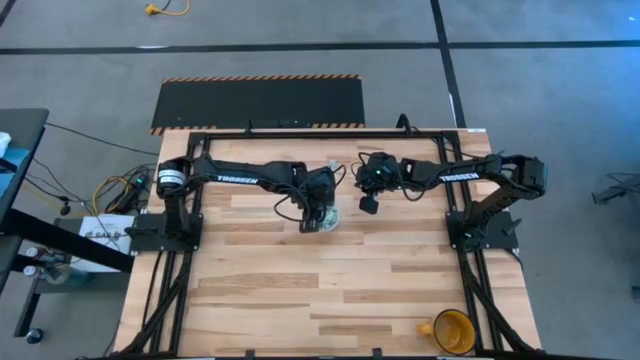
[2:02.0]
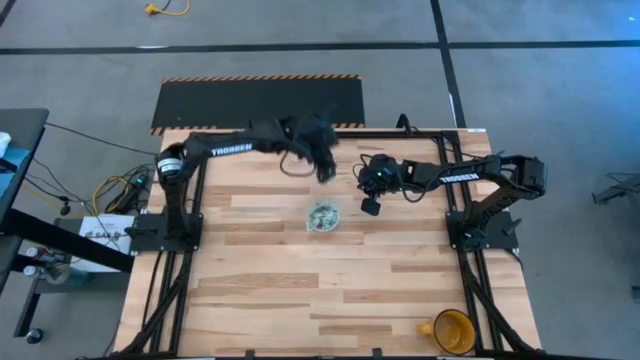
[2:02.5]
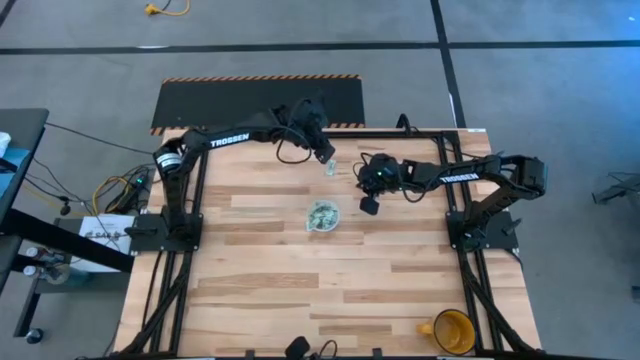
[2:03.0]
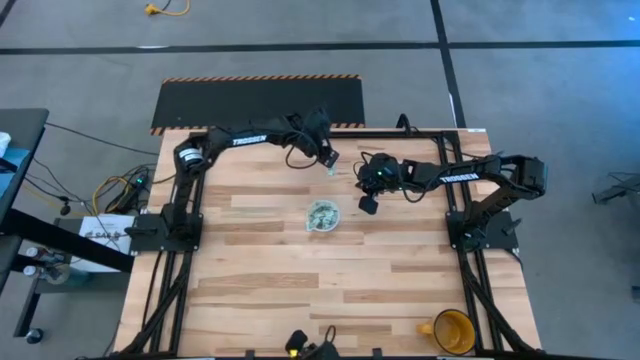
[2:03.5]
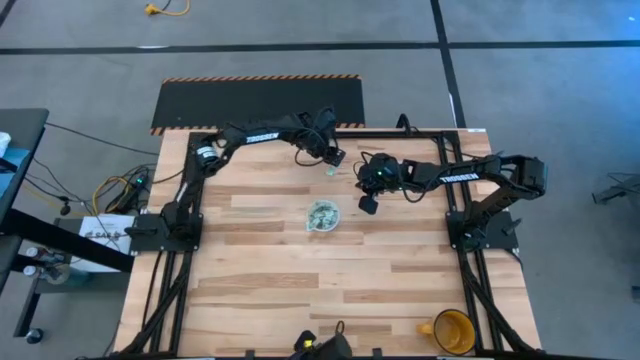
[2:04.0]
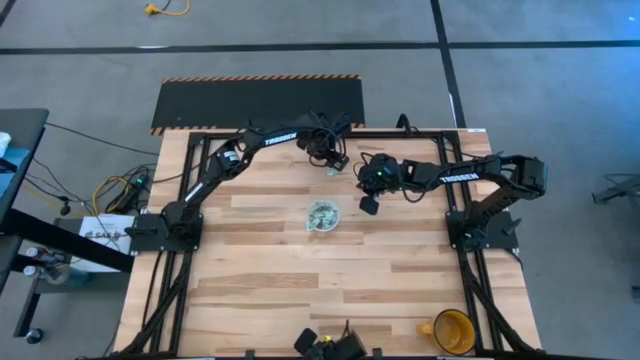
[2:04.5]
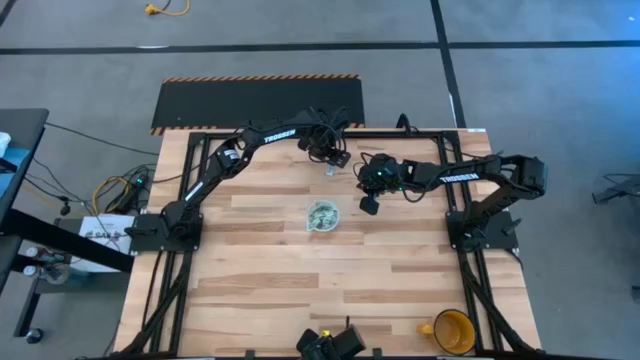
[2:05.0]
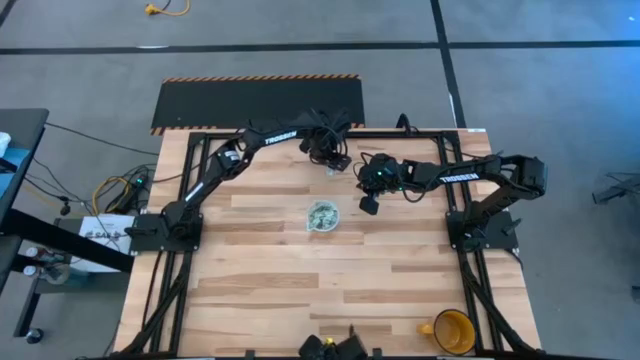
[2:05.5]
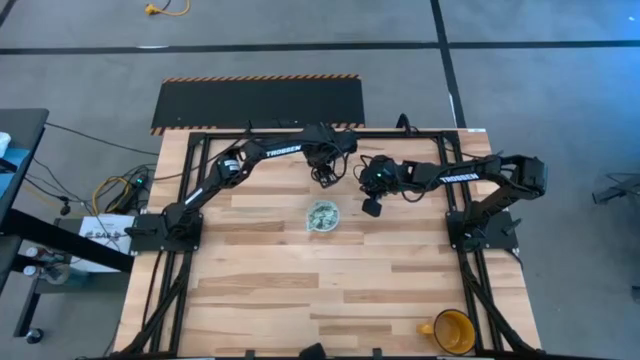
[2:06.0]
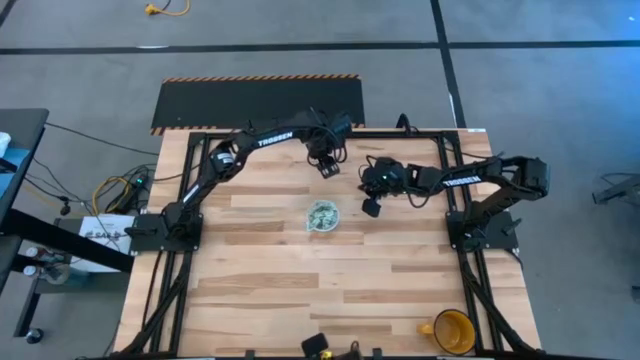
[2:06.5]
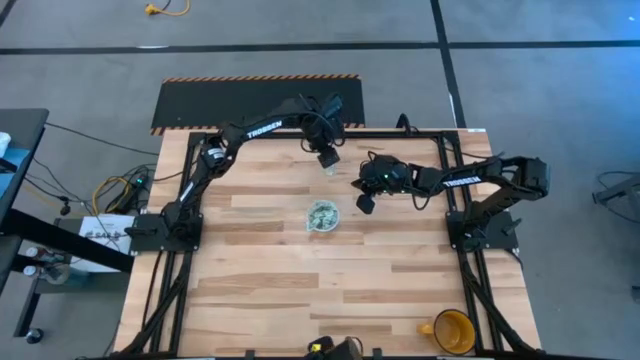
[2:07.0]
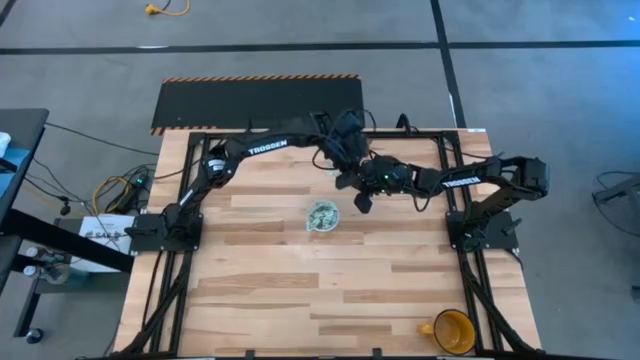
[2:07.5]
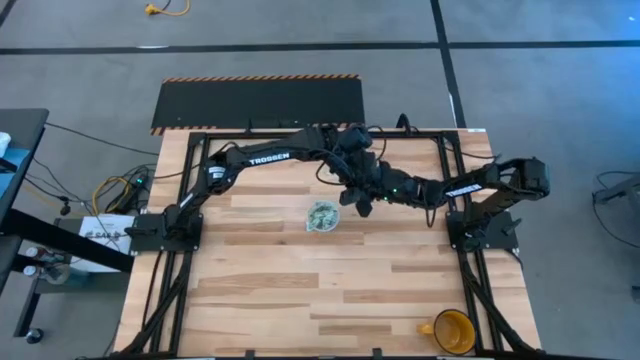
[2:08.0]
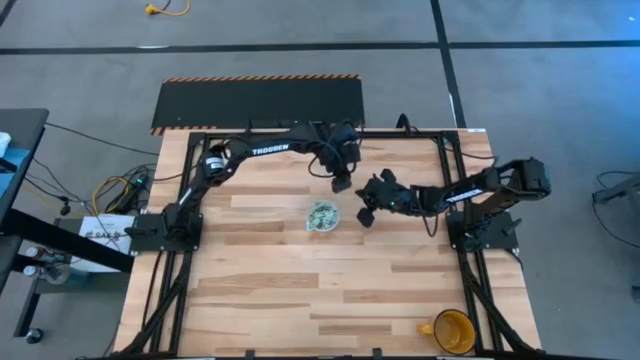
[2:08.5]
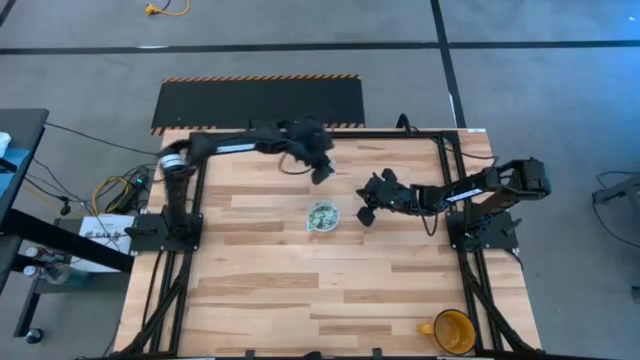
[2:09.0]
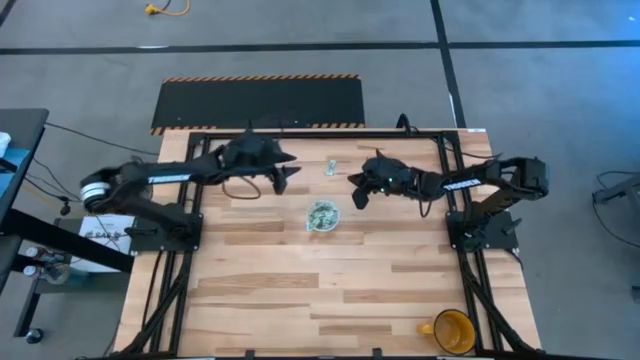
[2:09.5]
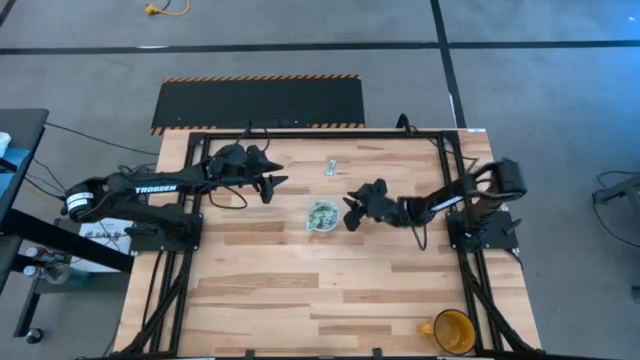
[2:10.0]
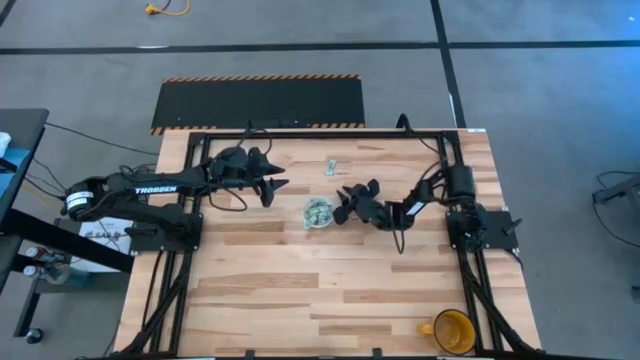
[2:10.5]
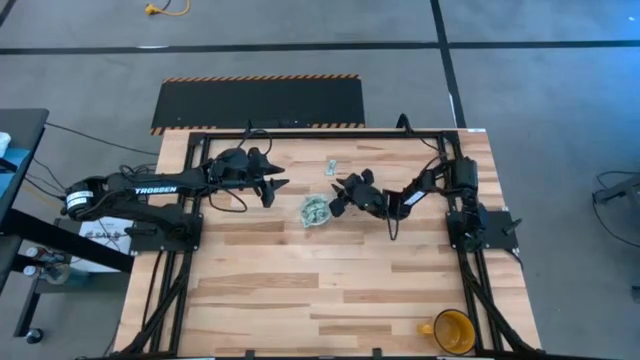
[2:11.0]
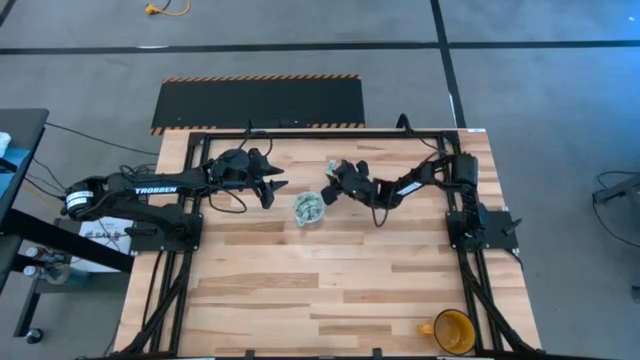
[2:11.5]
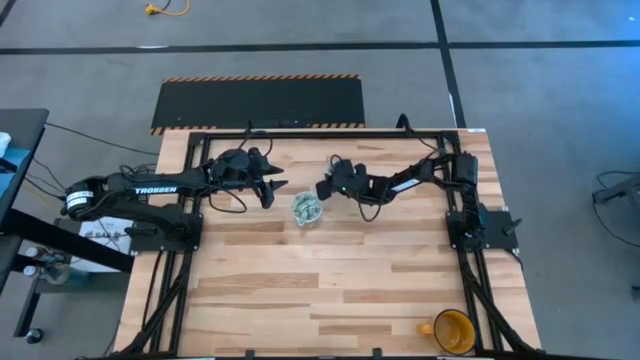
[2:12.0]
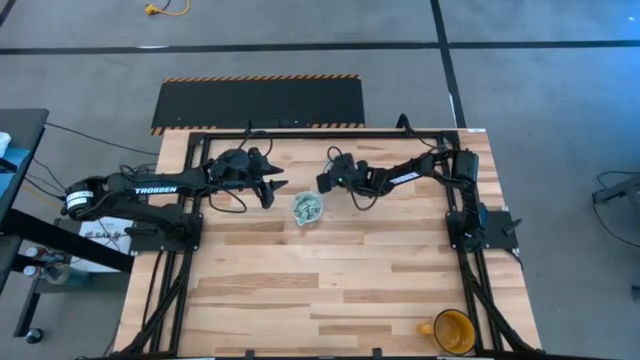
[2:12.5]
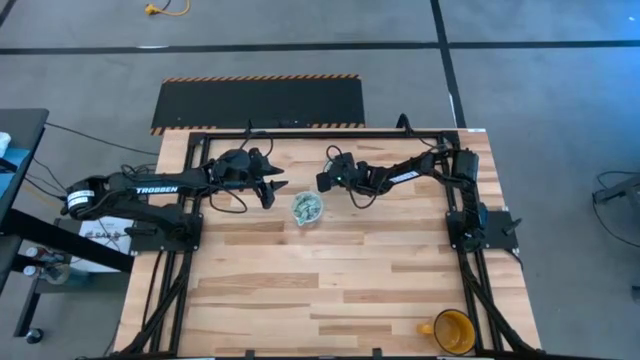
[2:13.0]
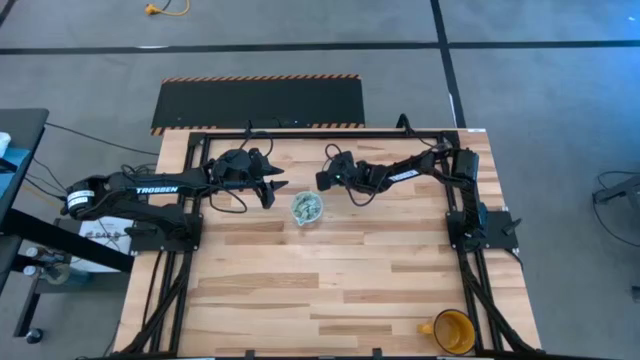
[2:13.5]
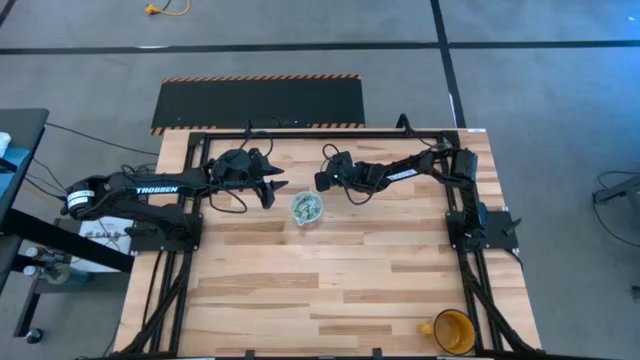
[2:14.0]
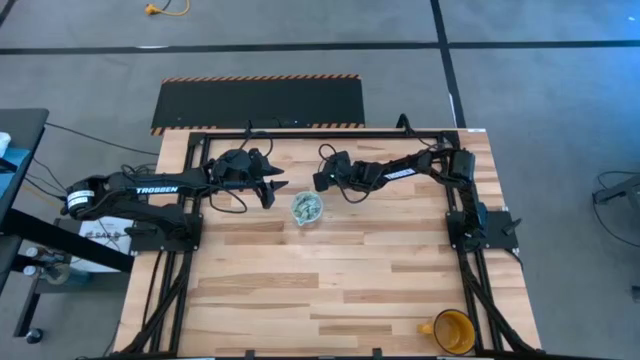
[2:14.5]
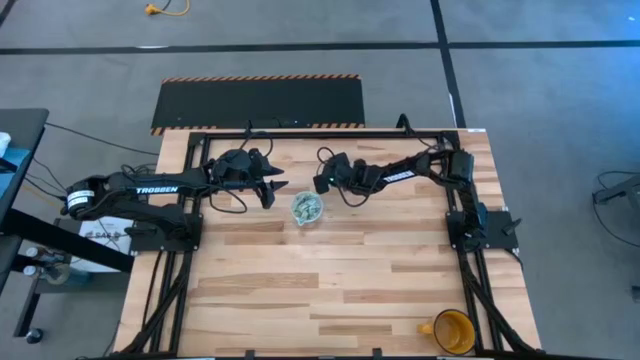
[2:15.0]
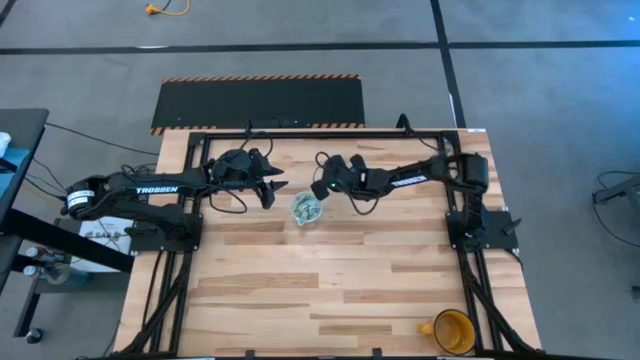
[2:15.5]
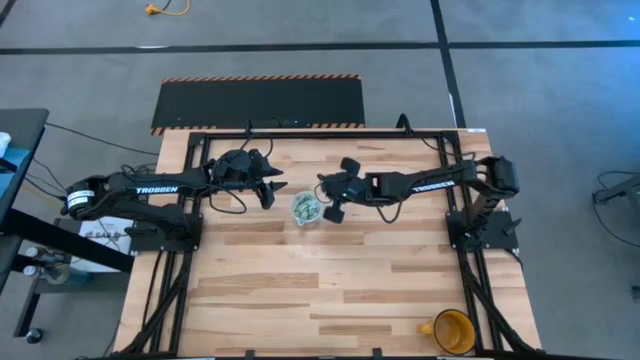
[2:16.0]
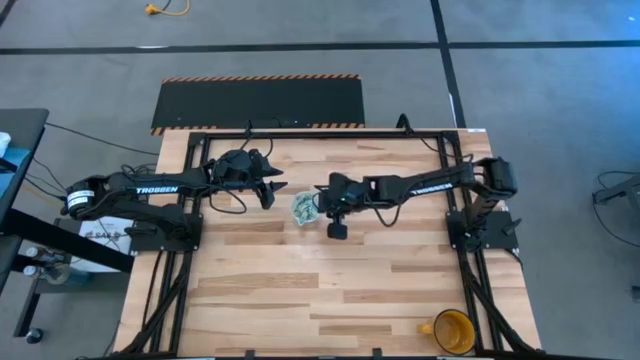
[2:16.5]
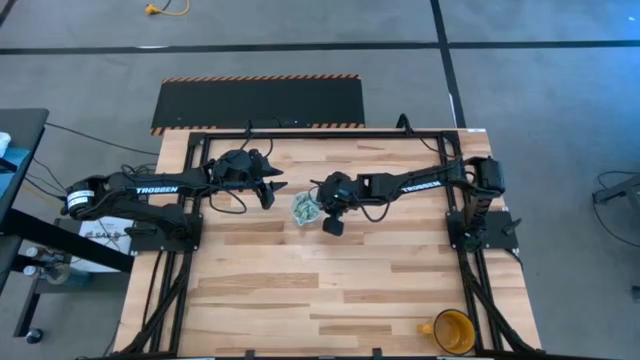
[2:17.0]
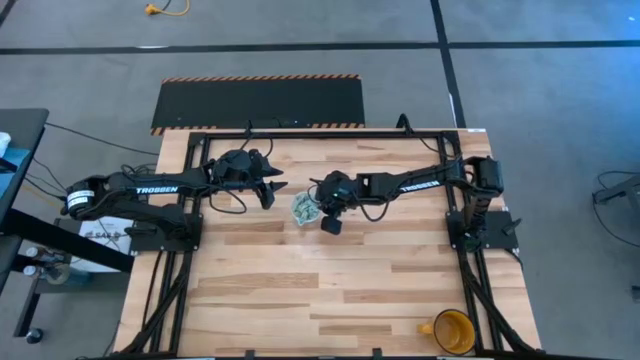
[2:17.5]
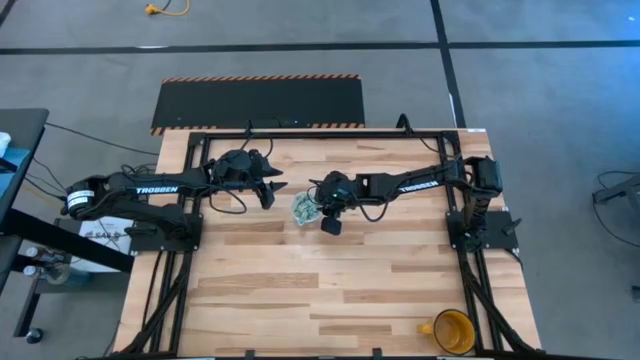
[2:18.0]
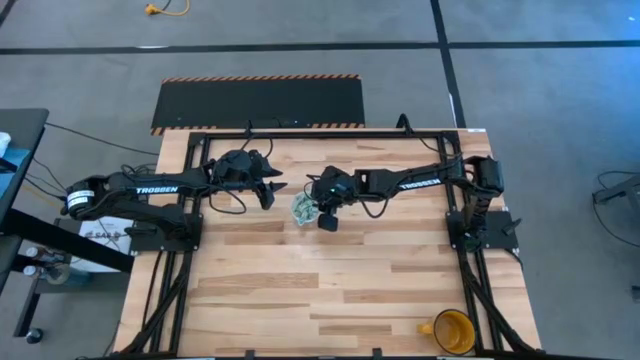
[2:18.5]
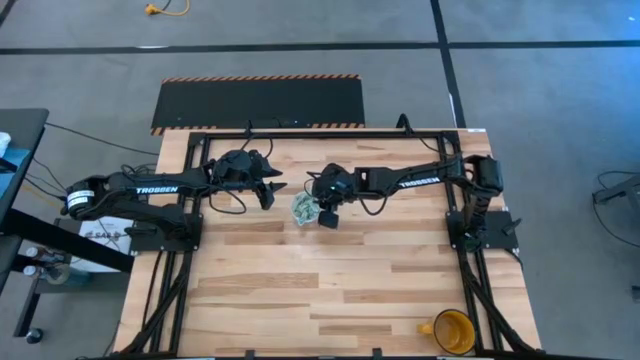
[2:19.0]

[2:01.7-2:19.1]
Task: Pick and place Stevia / Truvia into bins
Put the green stevia packet into the transparent container

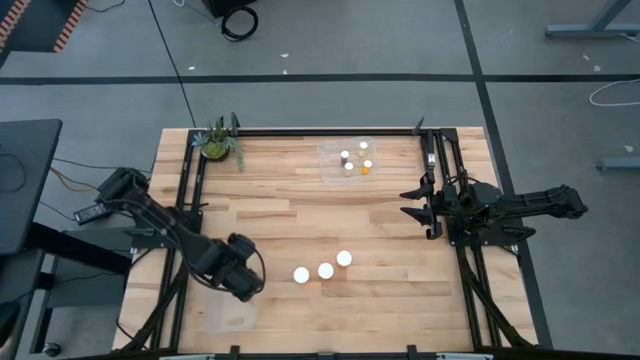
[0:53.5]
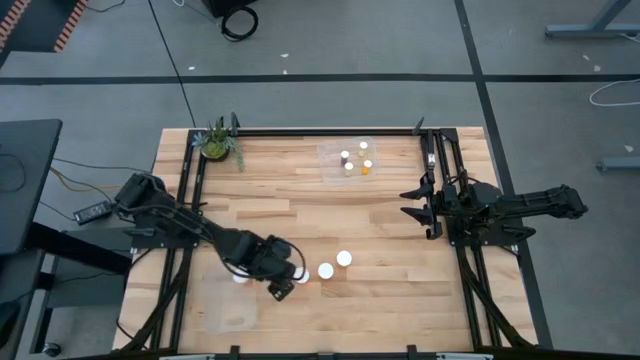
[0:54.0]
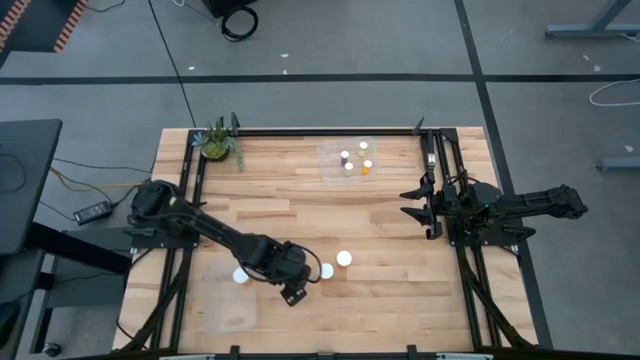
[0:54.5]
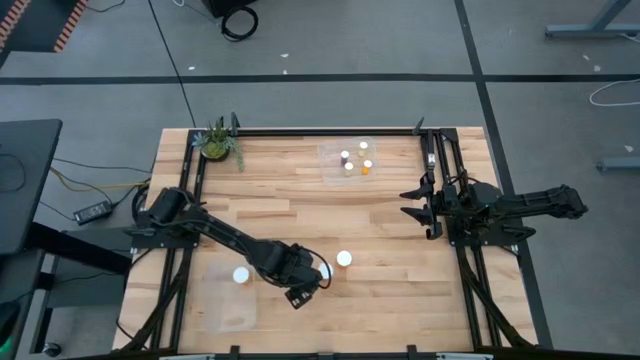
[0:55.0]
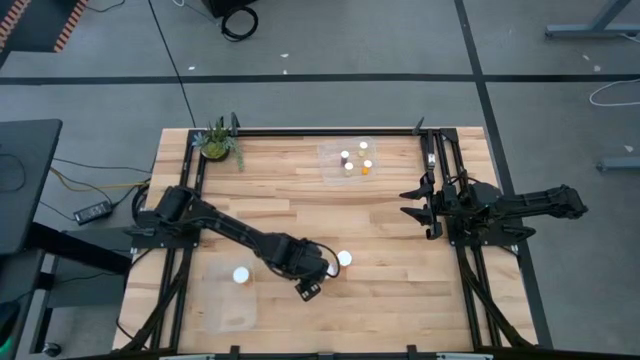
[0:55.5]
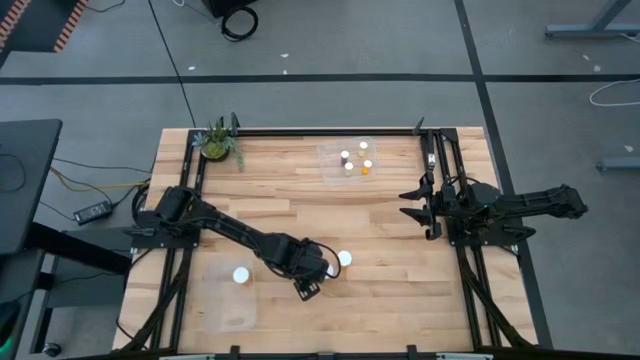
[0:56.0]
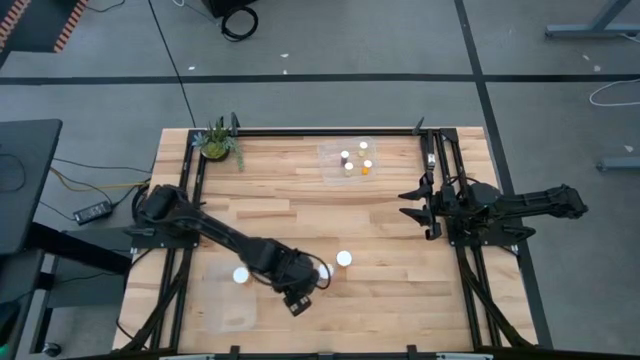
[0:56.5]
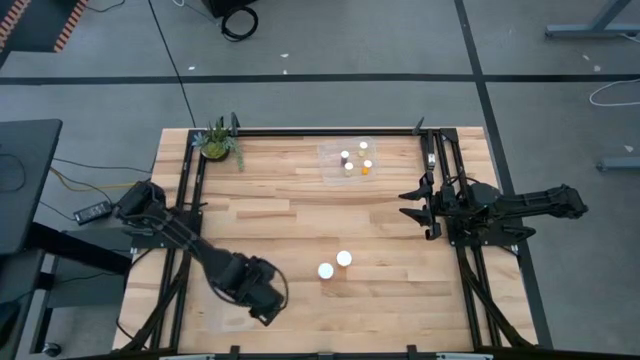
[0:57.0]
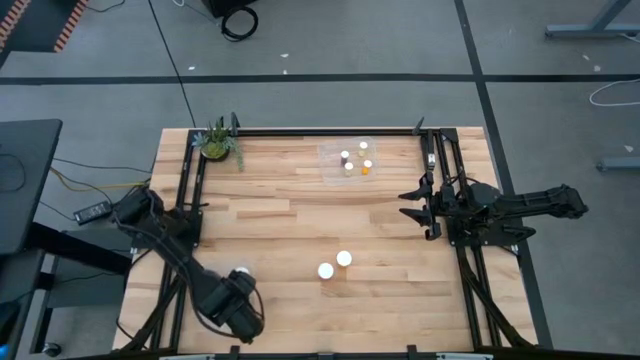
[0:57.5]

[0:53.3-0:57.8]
Task: Pick and place medicine bottles into bin by pill shape (circle, oval)
Put the big orange pill bottle into the bottom transparent bin
